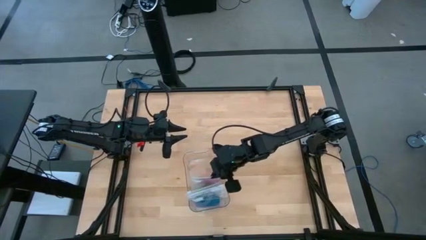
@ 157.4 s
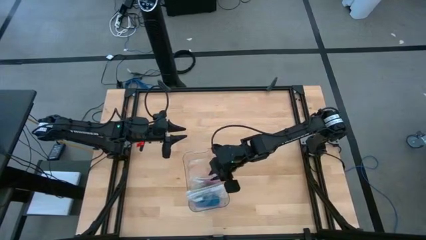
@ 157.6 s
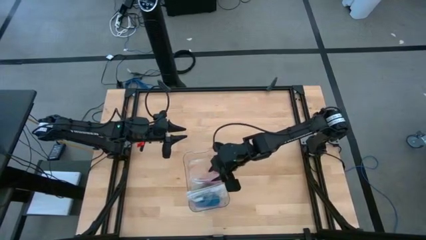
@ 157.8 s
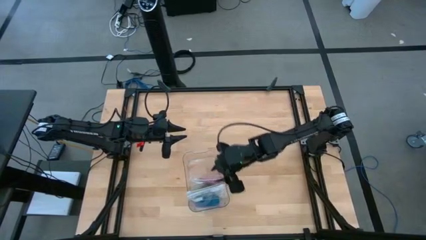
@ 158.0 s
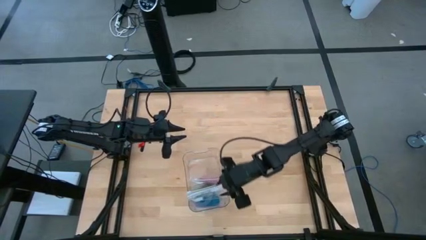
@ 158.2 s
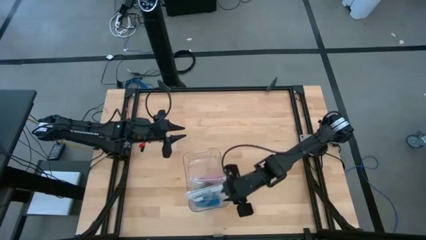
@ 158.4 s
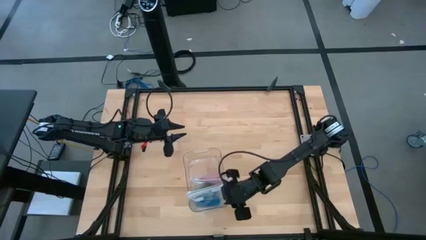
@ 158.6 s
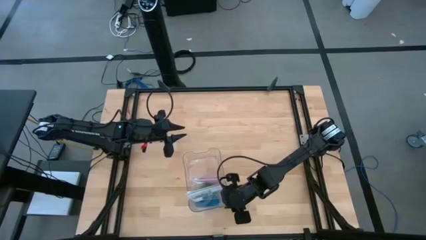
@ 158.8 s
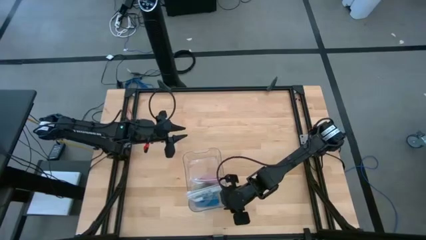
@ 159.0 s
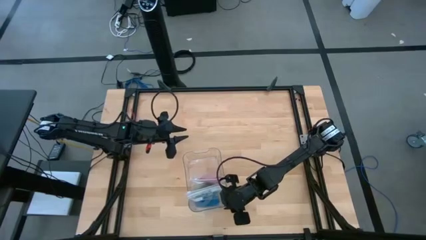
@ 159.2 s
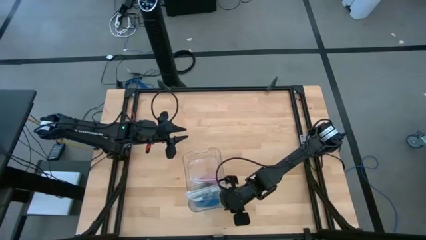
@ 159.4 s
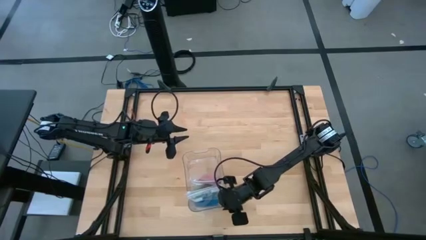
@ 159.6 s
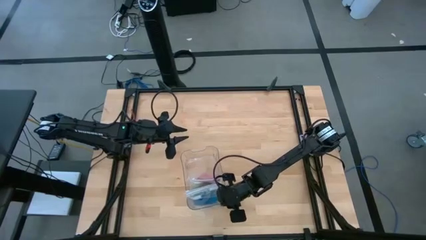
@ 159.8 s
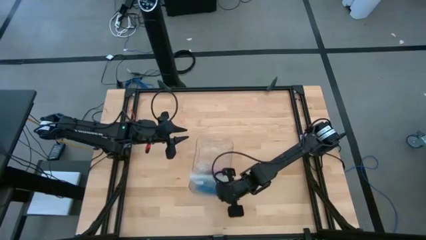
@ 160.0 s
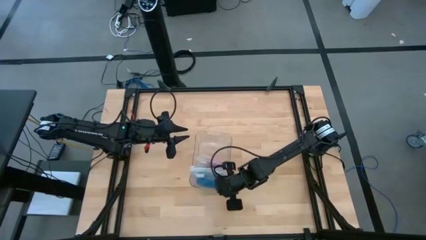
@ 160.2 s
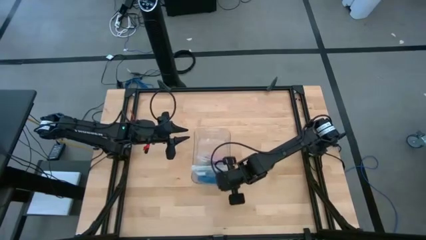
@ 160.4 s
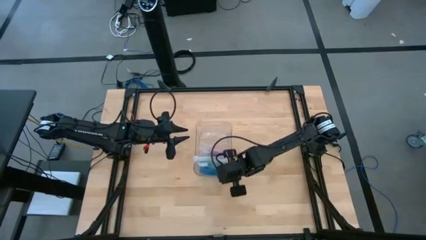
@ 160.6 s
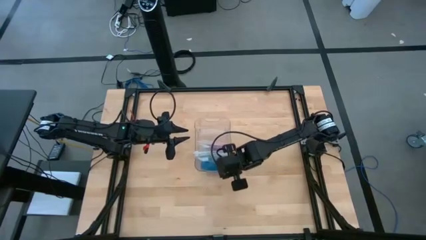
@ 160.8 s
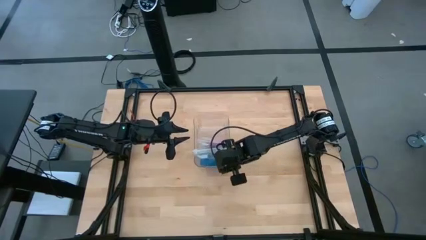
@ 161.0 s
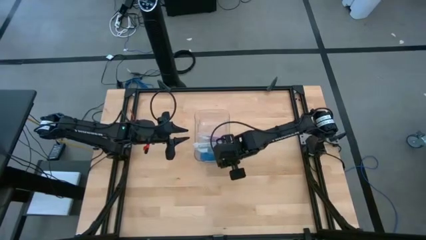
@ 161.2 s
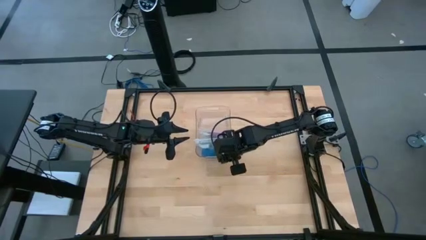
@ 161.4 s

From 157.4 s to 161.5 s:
Task: Roll bandage
Move the transparent bin to the center of the table

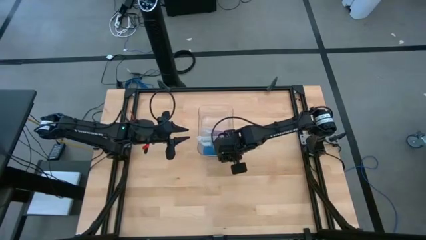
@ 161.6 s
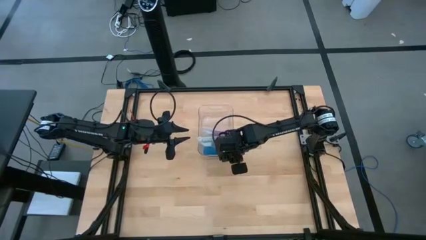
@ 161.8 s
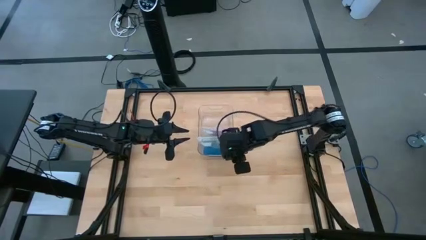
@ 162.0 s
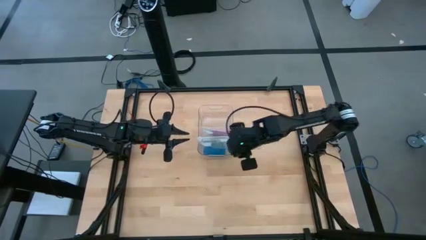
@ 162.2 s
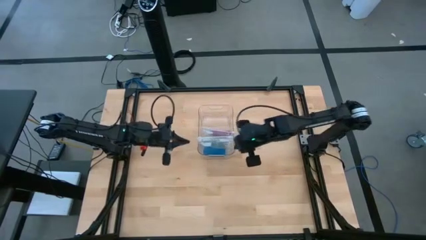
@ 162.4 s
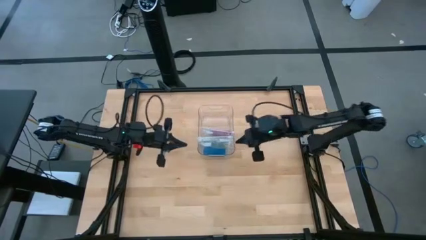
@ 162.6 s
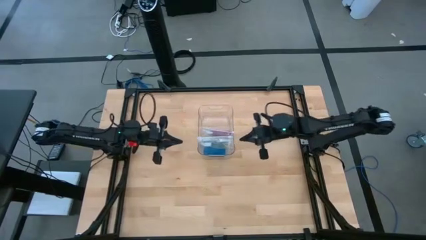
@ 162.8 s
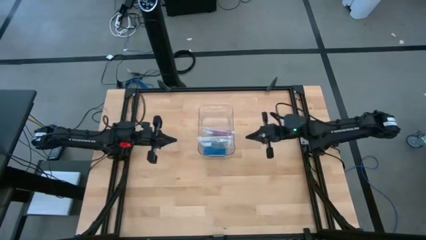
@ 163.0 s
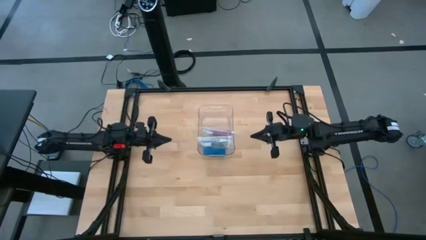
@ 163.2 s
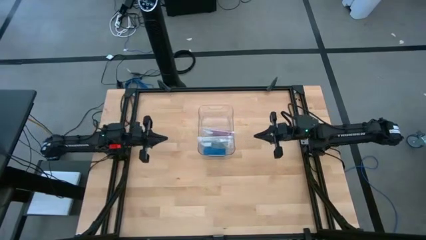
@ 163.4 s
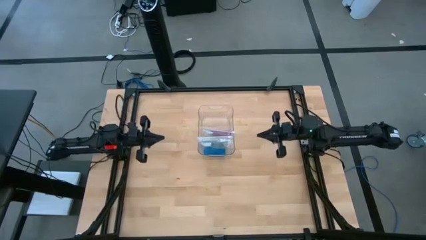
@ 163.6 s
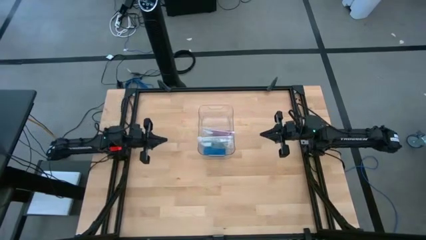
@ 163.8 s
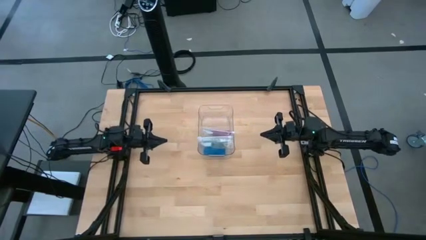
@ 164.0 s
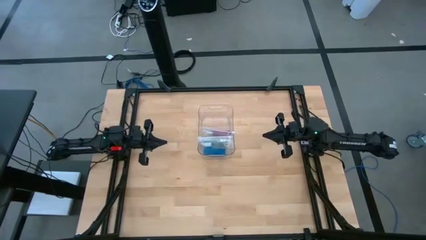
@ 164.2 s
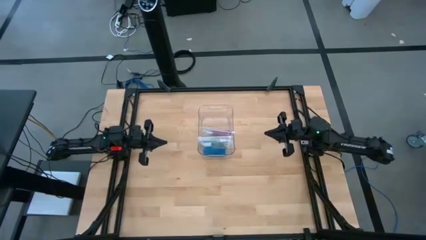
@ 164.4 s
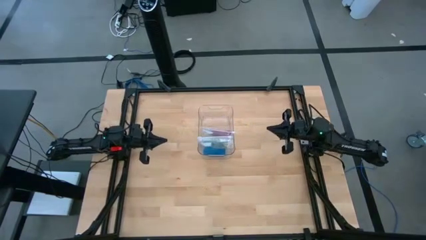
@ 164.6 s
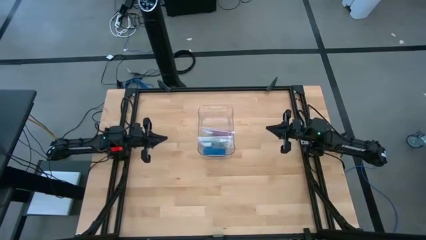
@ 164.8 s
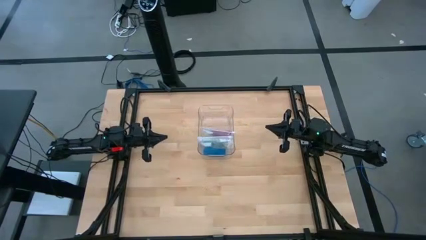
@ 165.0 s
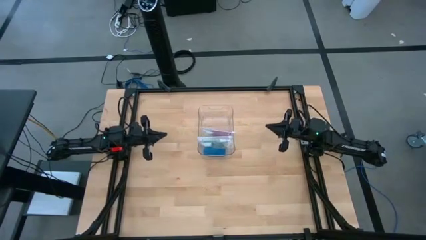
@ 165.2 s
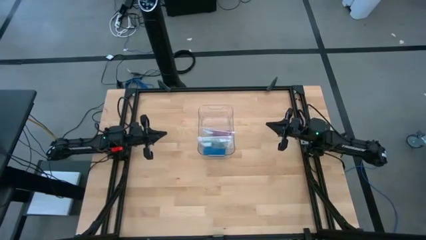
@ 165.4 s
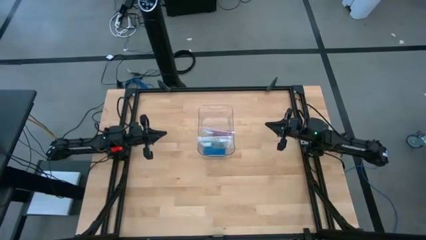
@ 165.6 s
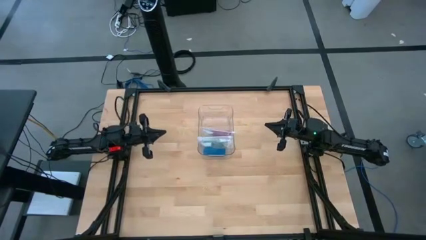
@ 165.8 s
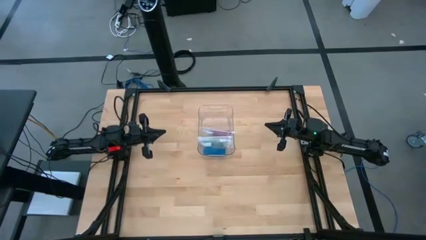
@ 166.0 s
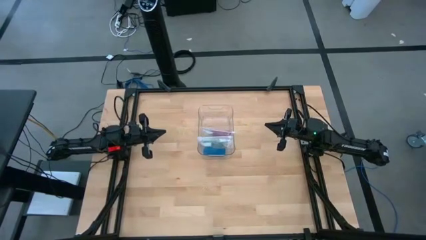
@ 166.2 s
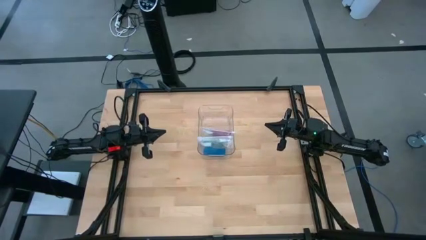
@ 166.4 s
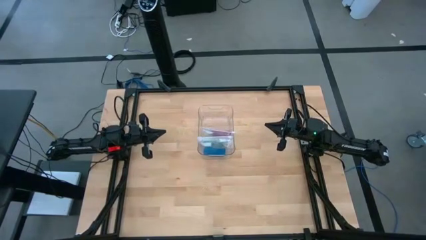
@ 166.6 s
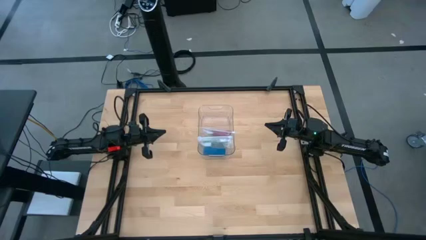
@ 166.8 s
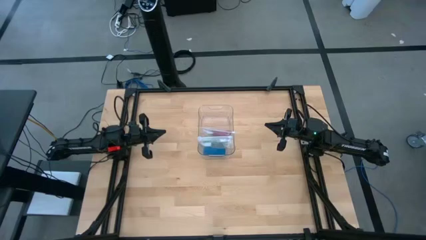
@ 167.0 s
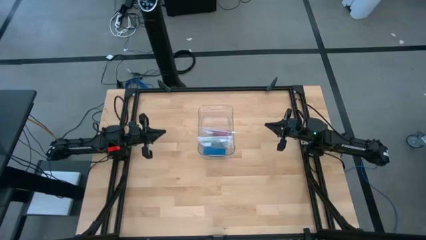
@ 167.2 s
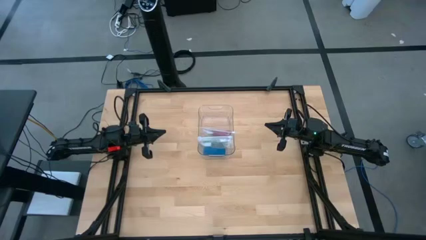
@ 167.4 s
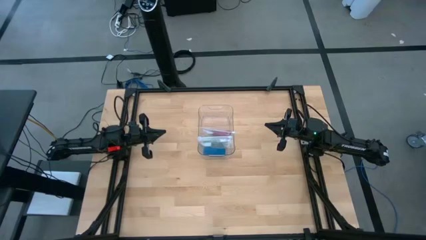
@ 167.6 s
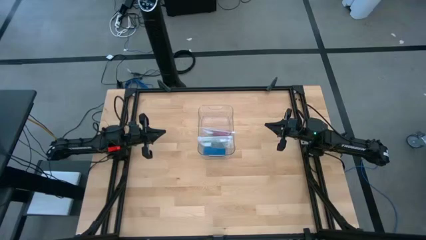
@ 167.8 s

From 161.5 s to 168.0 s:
Return to Home Position

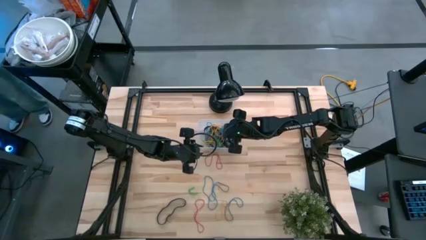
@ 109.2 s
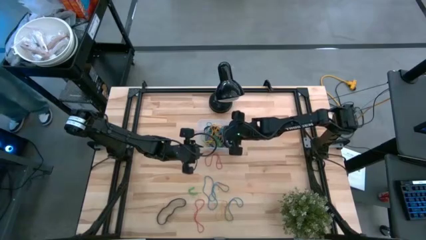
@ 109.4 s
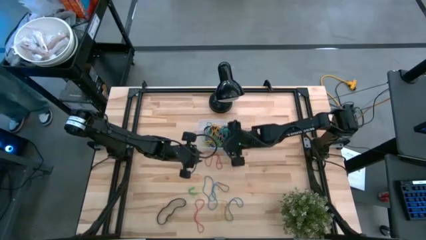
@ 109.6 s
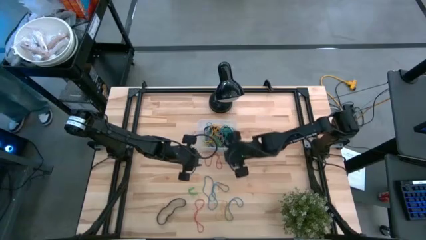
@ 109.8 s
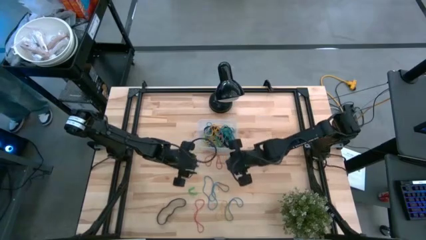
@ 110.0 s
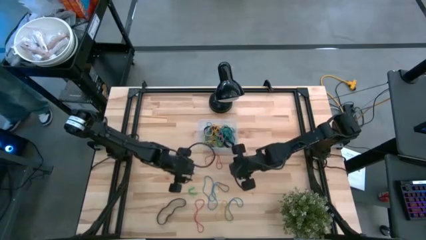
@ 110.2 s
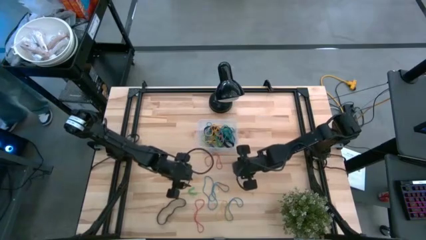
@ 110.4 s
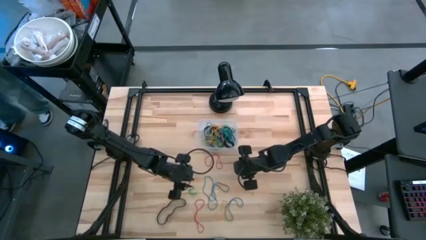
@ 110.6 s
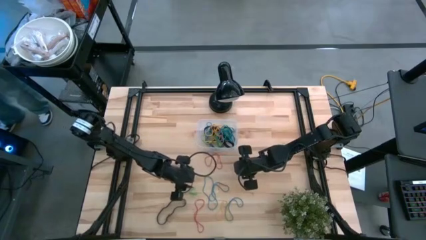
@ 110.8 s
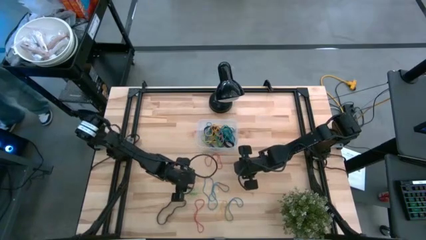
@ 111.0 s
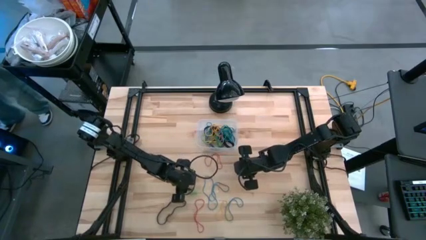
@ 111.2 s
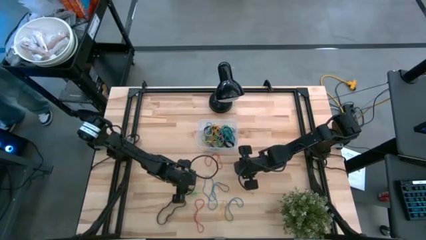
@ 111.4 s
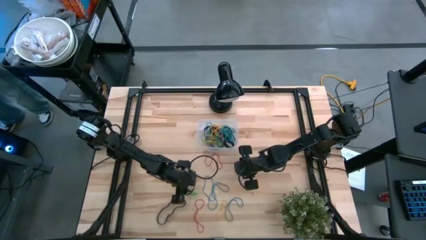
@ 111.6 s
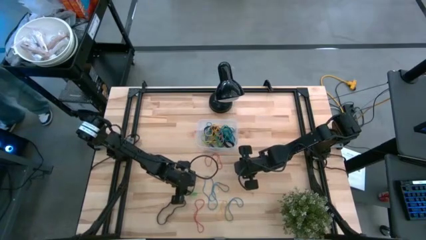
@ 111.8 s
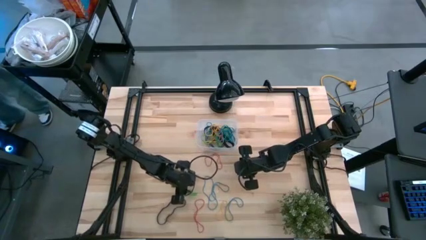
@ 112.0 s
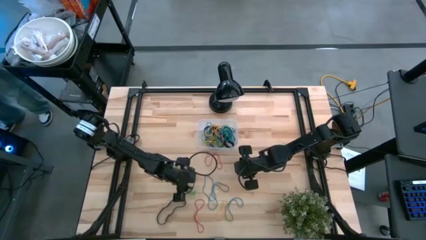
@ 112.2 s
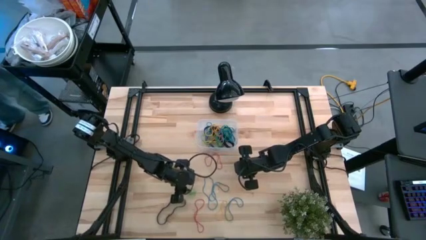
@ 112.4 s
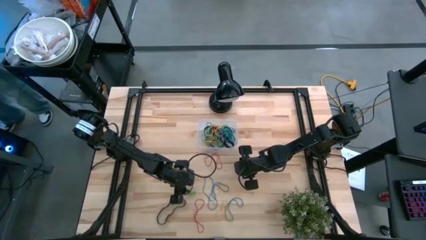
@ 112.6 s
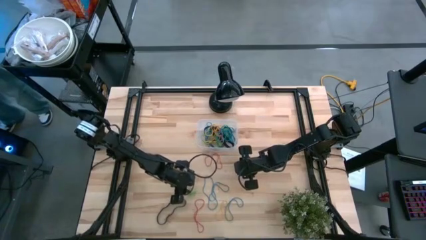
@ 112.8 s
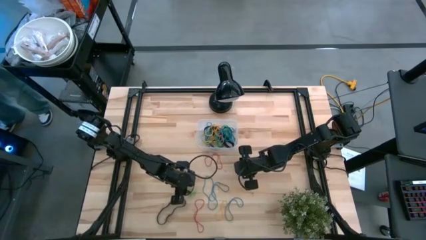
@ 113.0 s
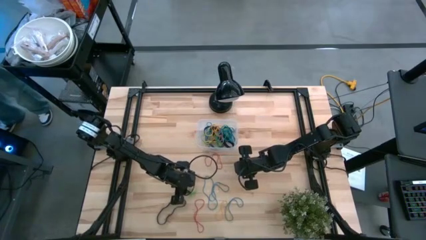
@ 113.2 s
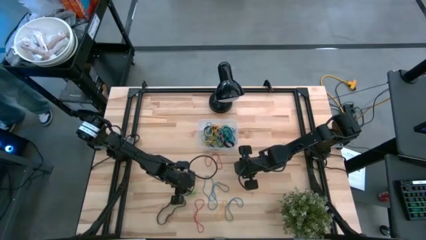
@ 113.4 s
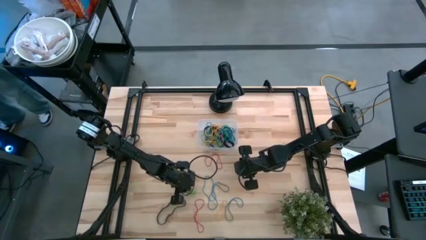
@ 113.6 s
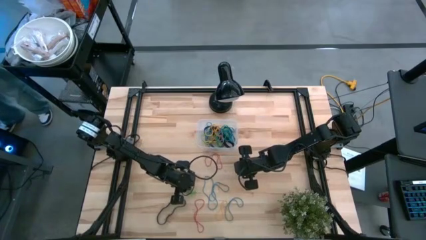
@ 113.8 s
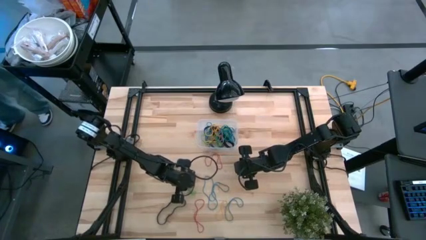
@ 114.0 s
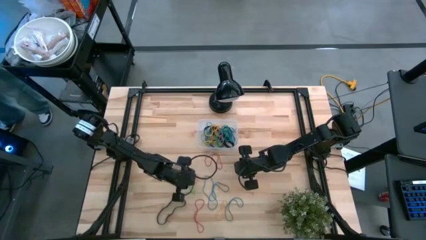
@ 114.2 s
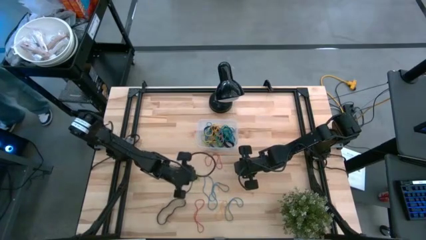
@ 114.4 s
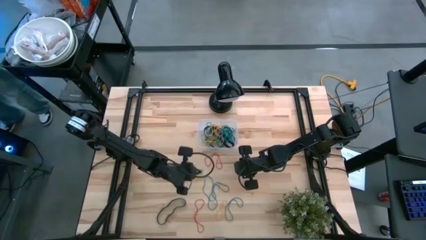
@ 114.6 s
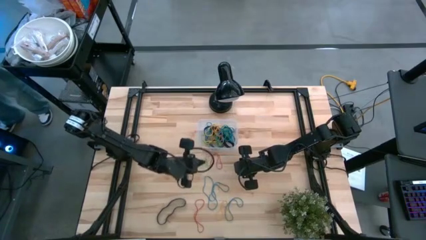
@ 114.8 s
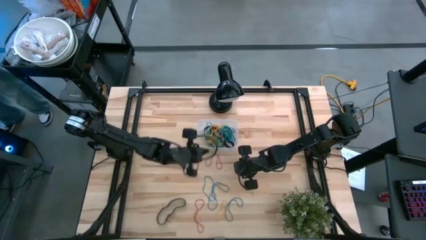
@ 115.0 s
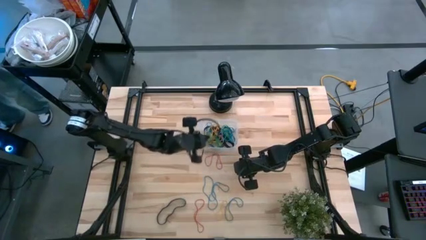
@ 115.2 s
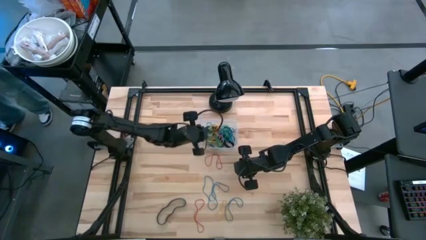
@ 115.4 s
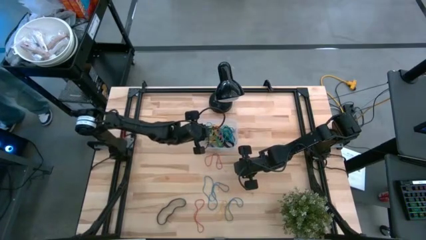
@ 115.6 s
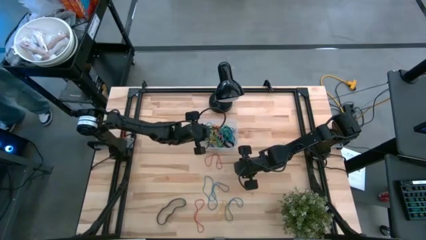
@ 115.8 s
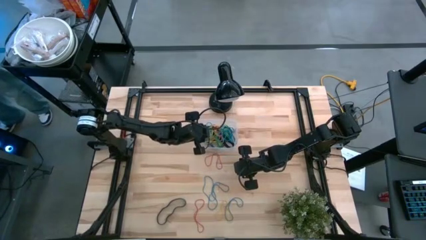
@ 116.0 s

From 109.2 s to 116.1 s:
Task: Pick and place rubber bands into bin
Put the green rubber band into the transparent bin
